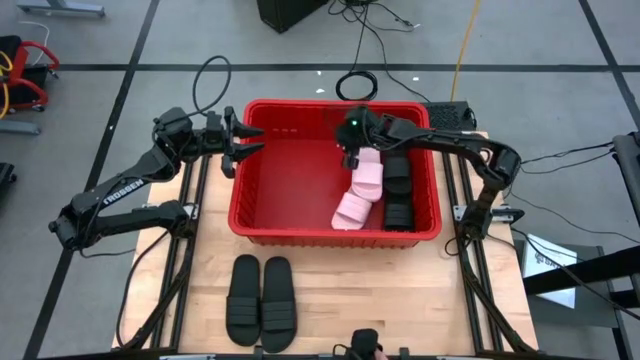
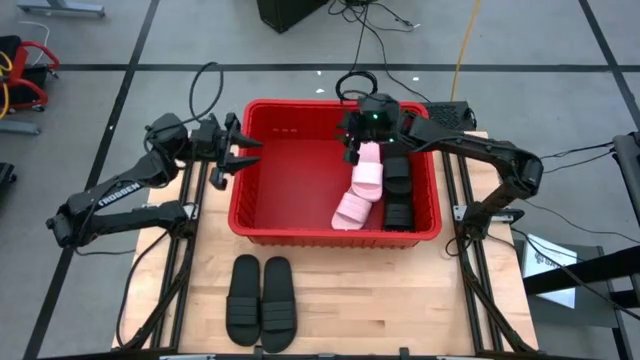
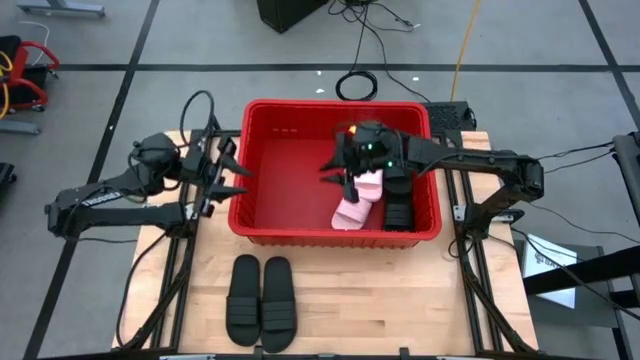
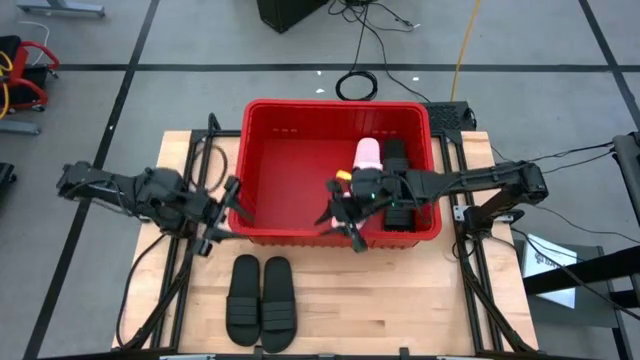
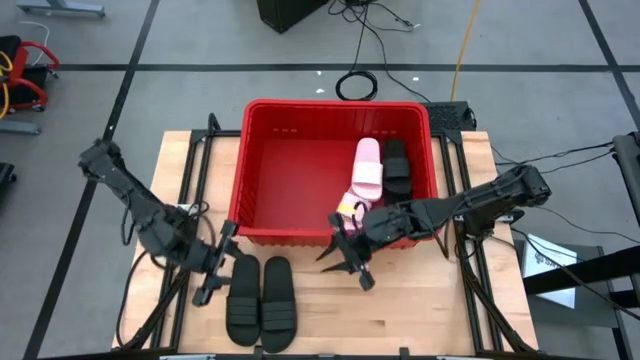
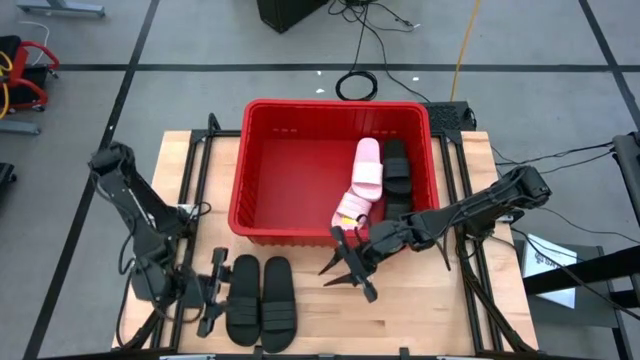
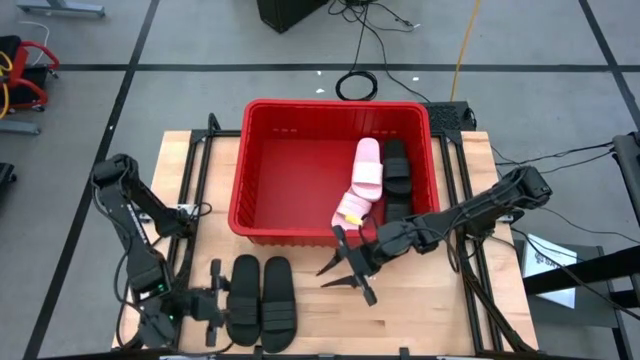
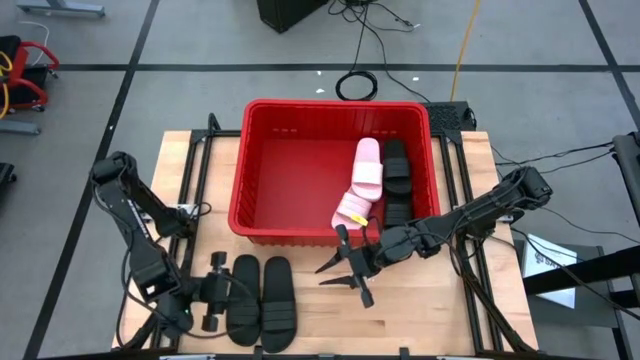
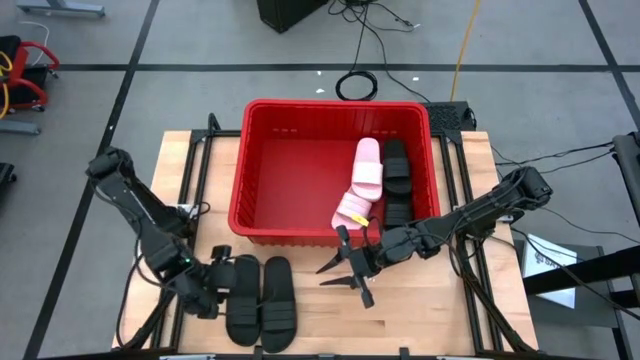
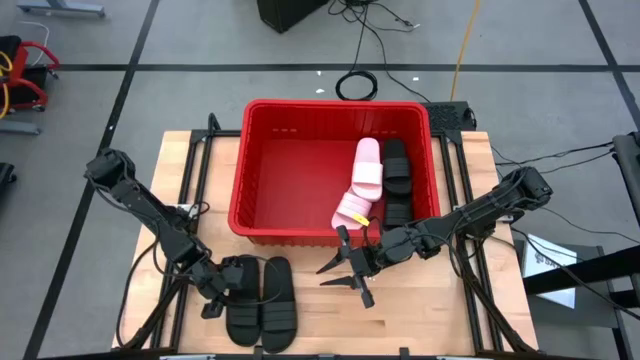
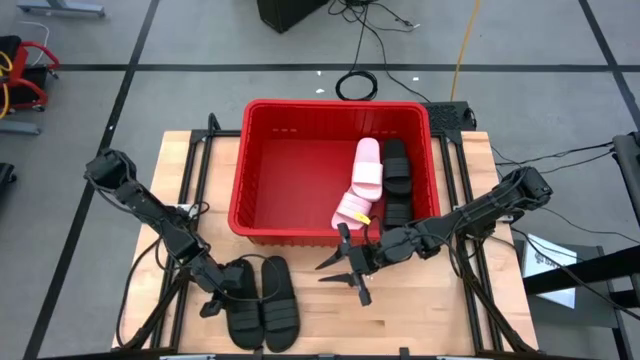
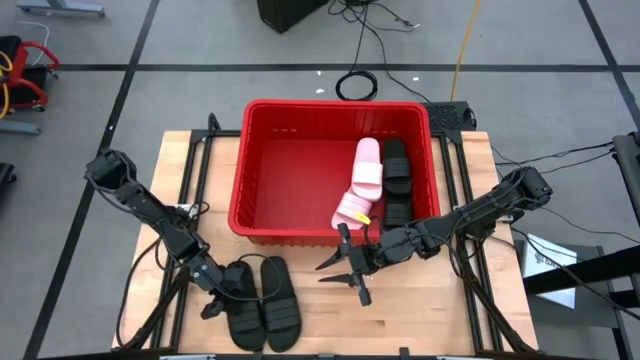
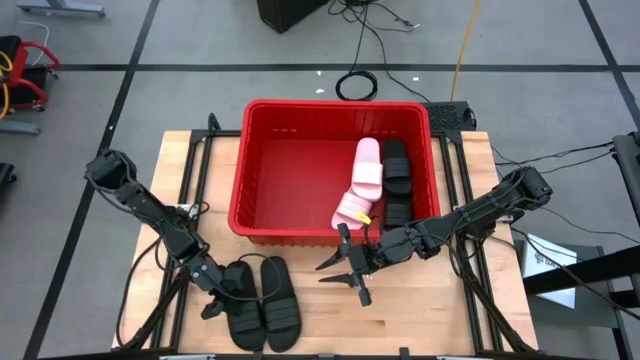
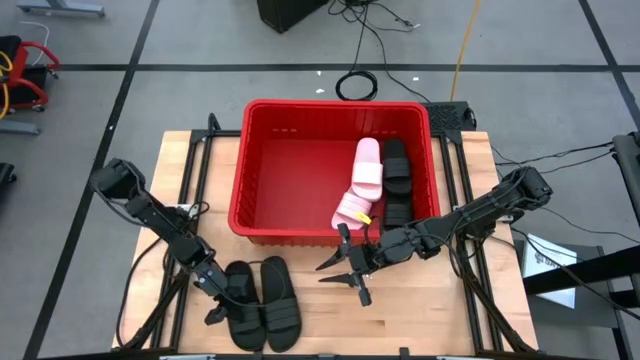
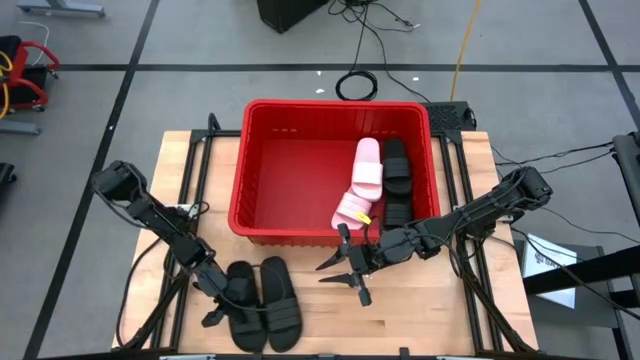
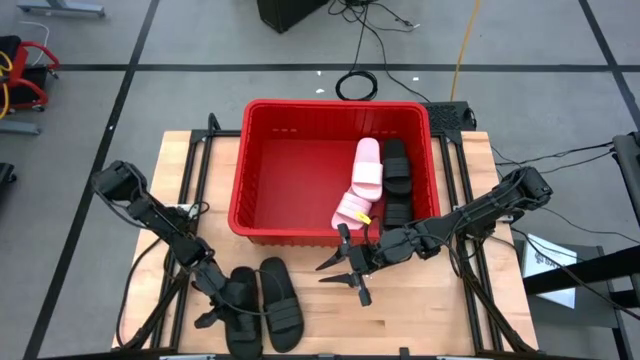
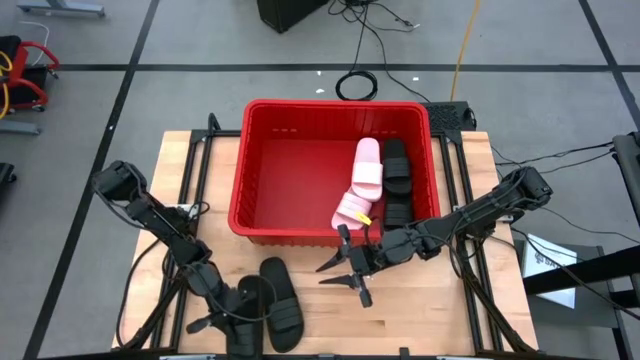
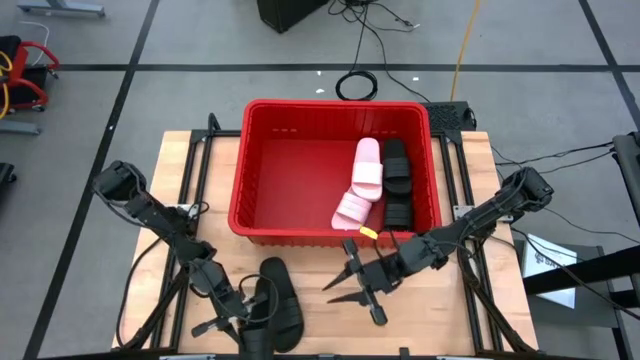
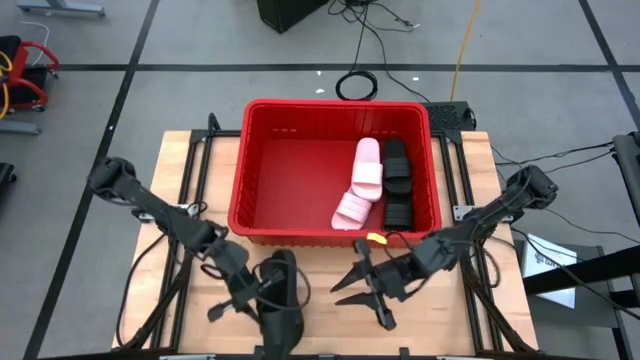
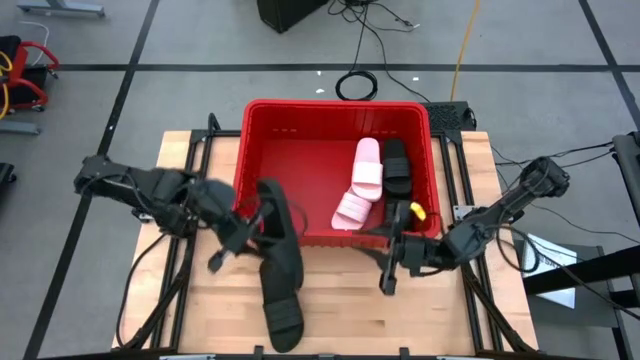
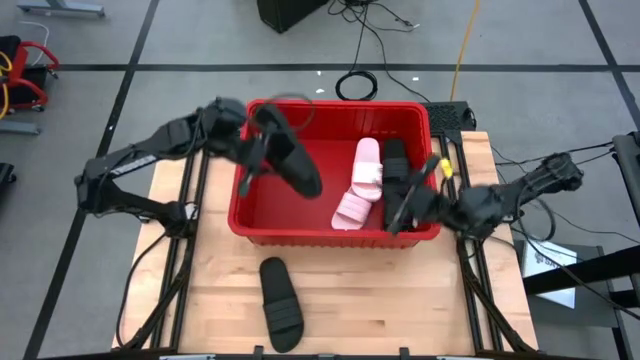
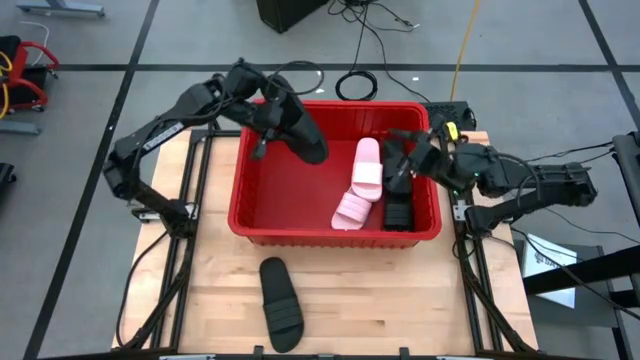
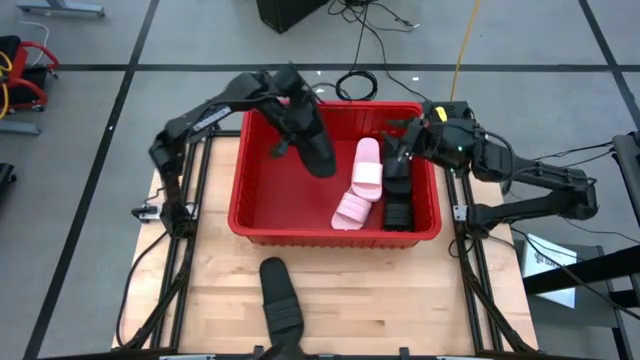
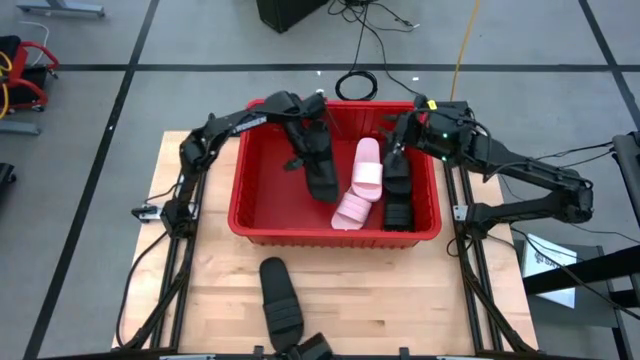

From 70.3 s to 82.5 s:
Task: Pick and place slides into bin
Put the left black slide into the red bin

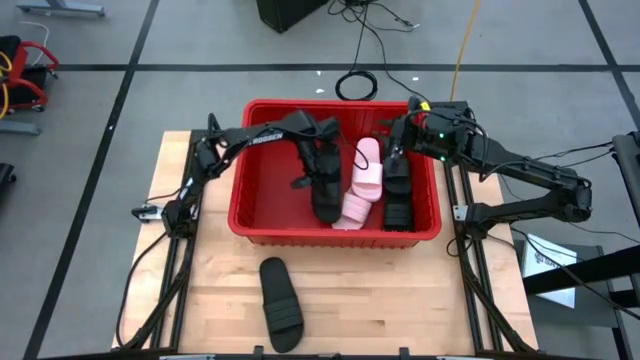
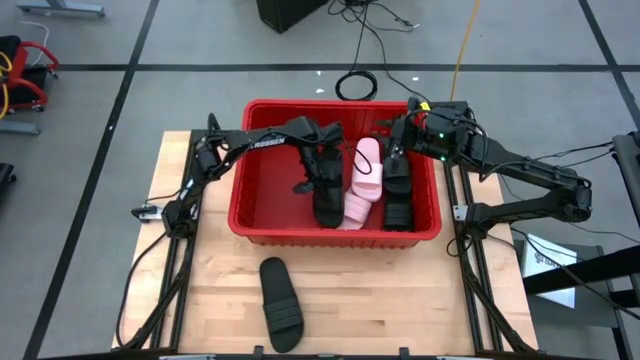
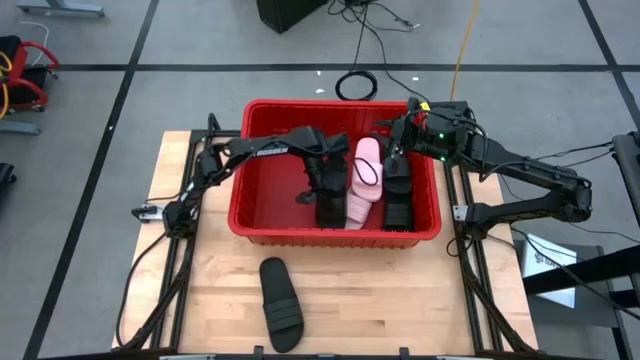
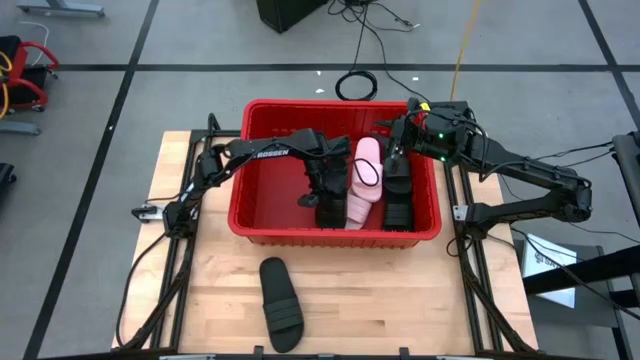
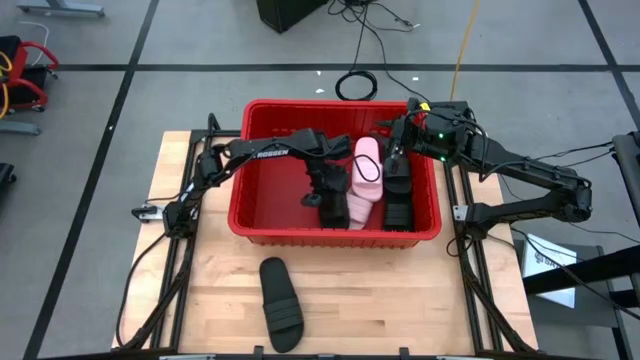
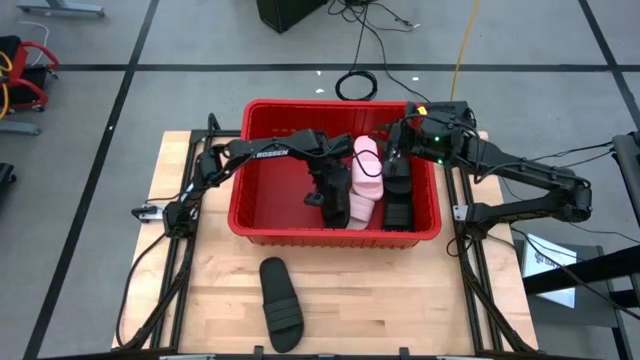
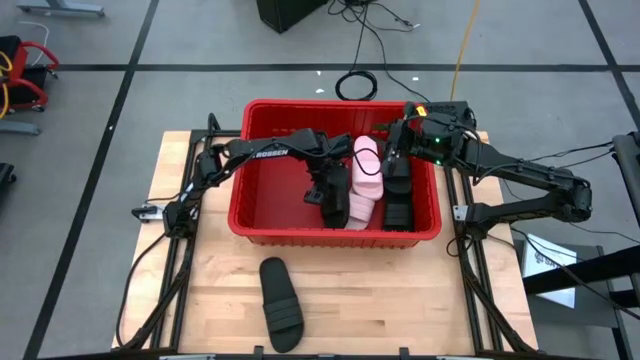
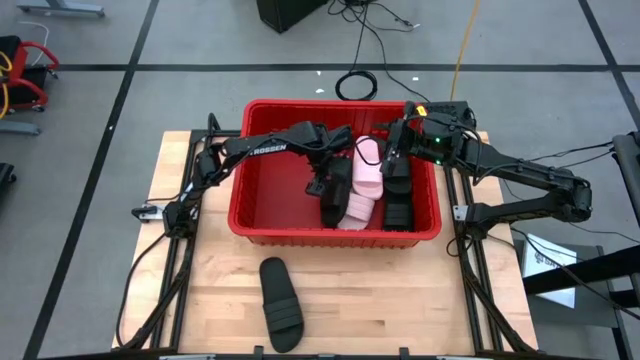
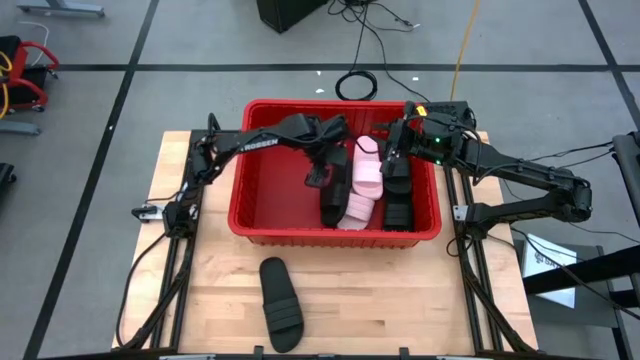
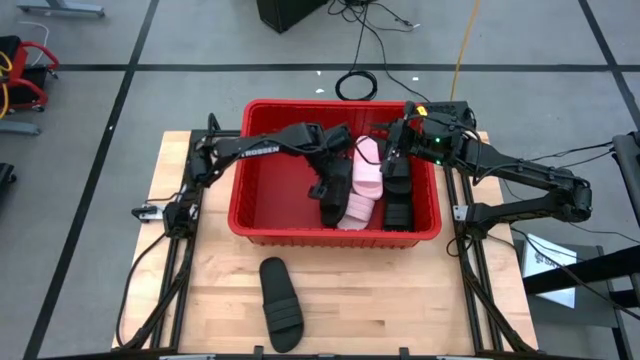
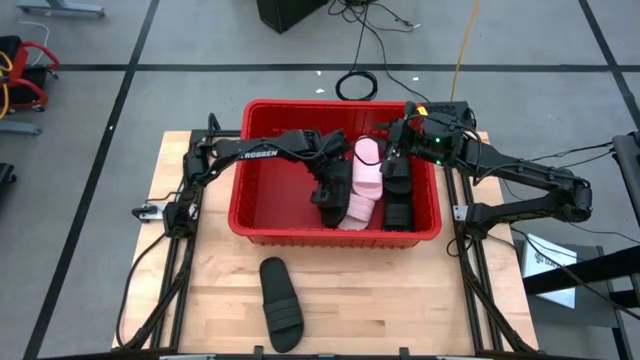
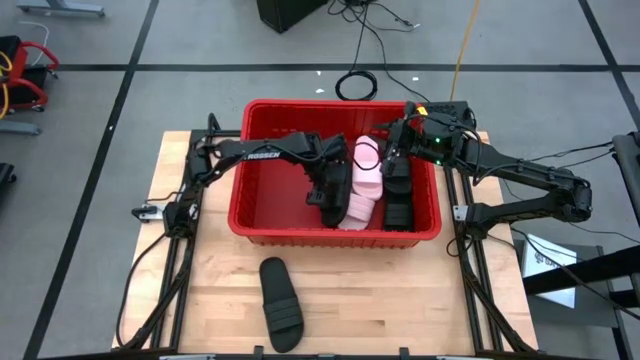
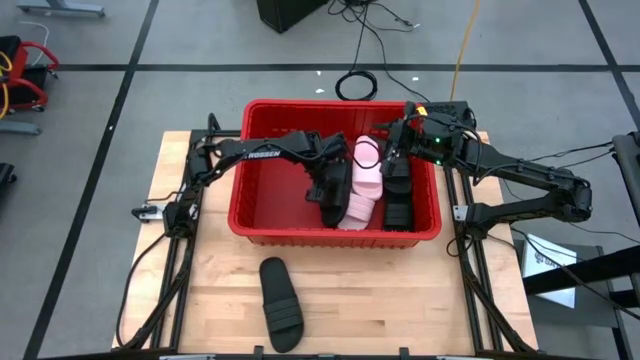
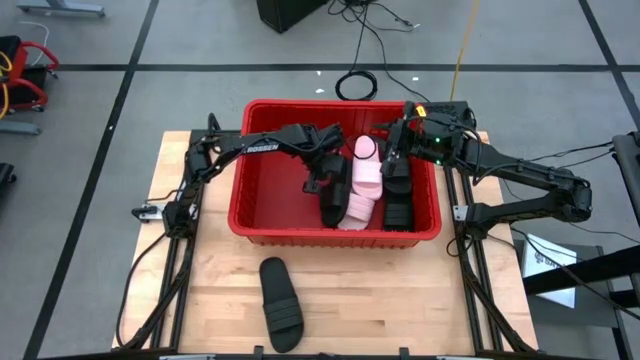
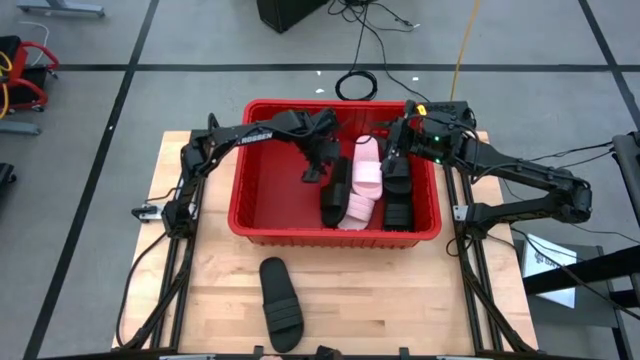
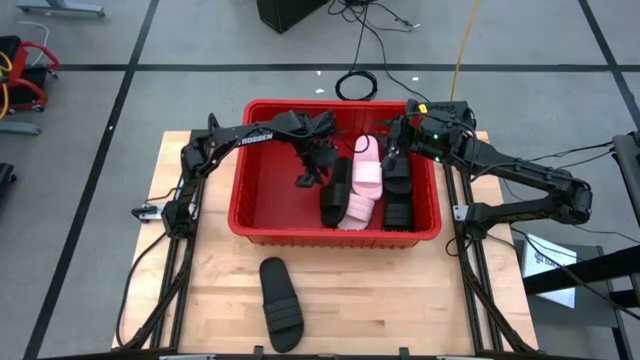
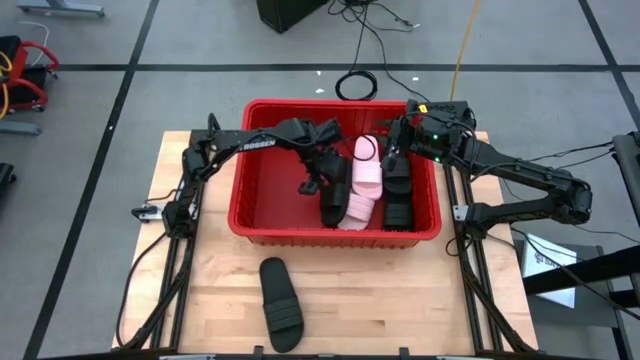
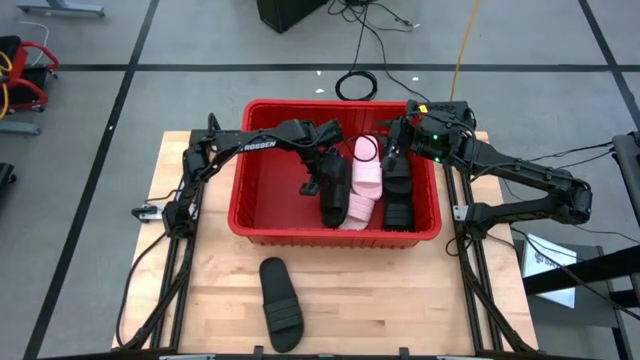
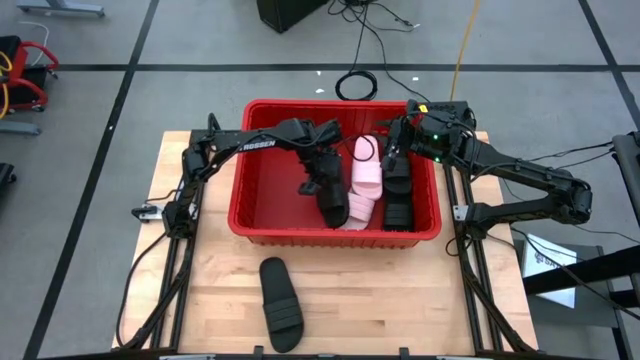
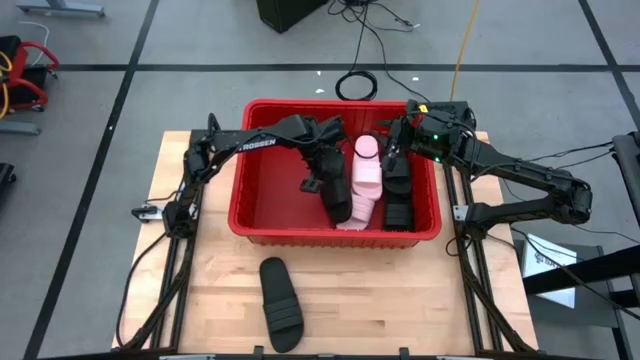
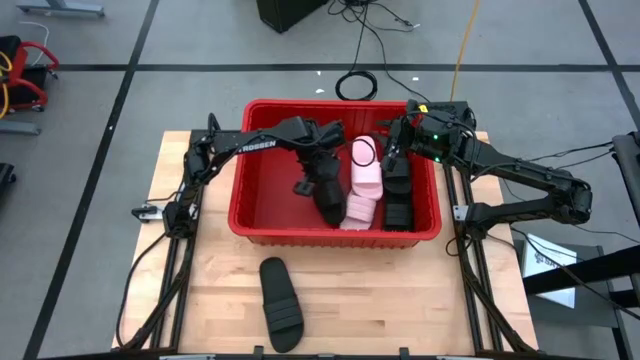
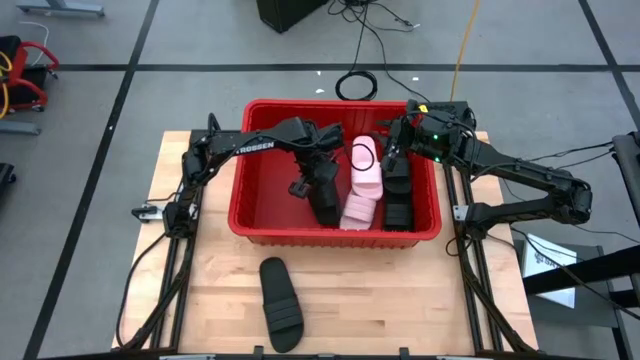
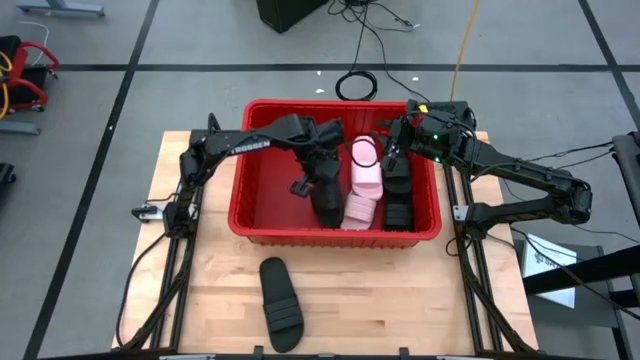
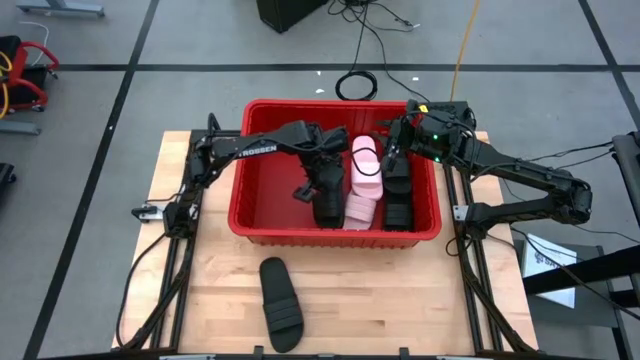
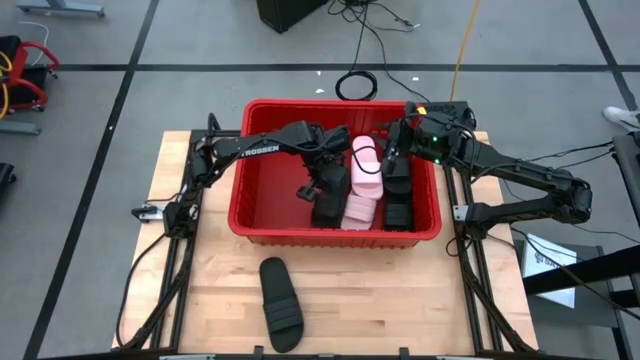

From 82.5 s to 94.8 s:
Put the left black slide into the red bin
